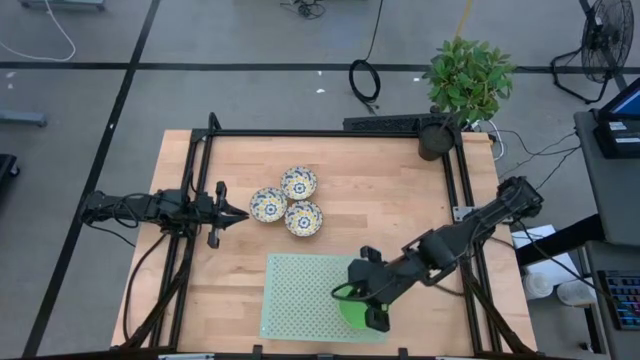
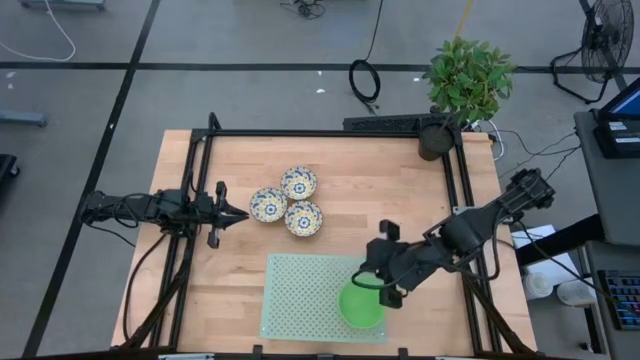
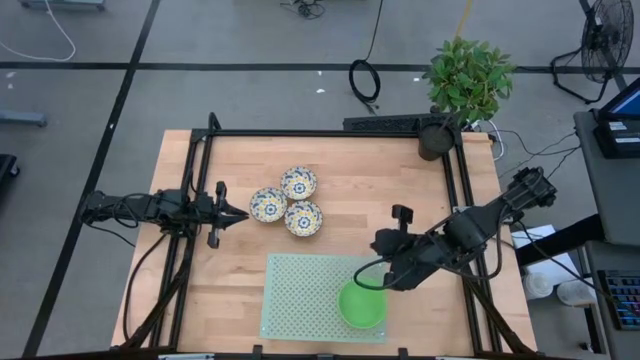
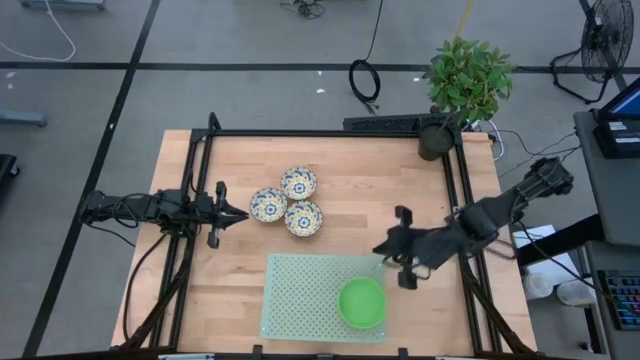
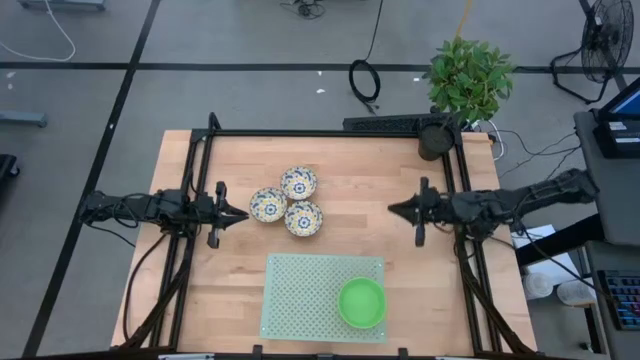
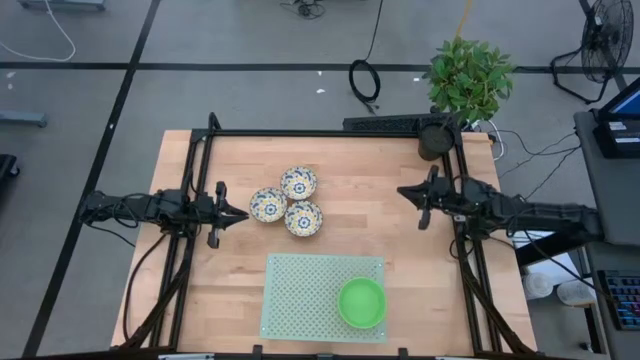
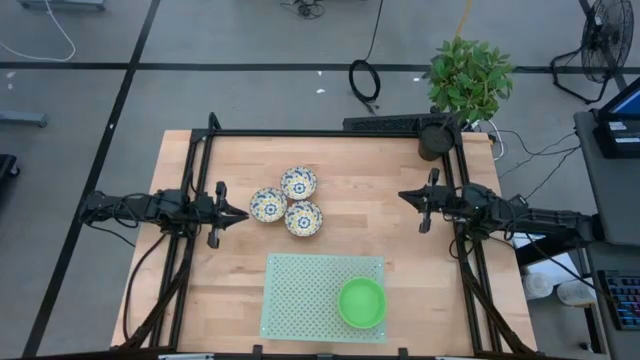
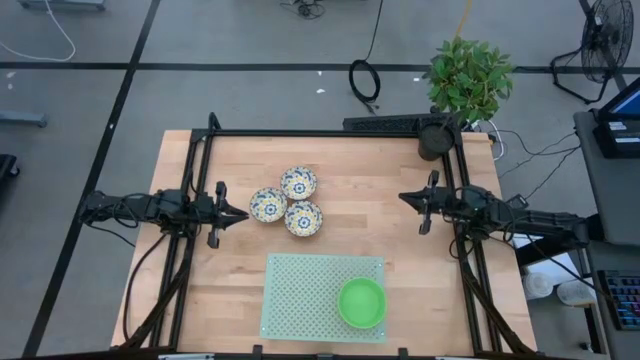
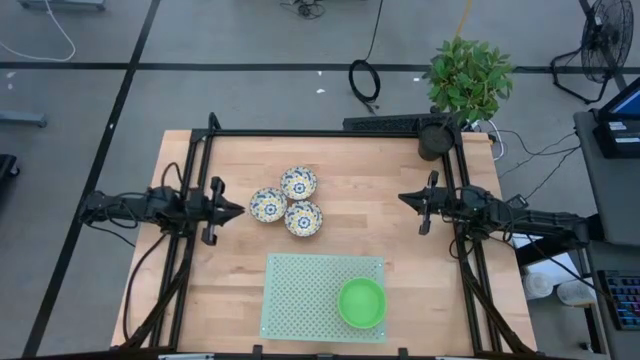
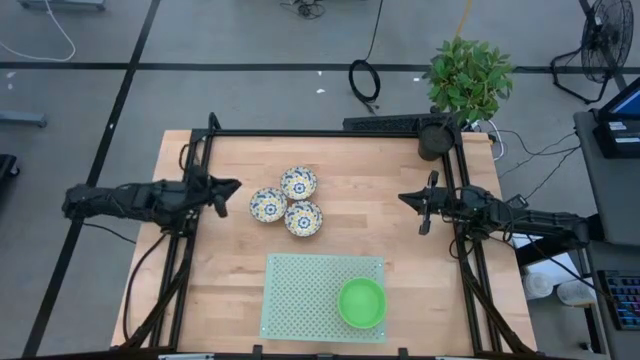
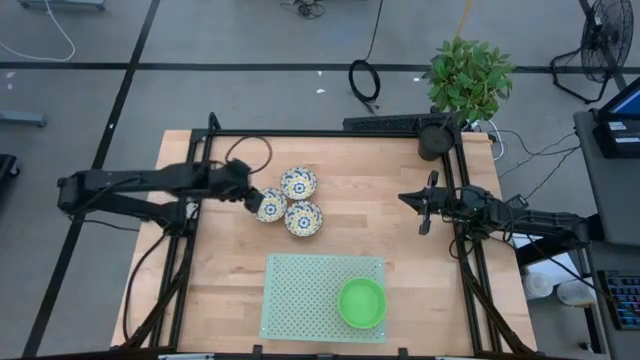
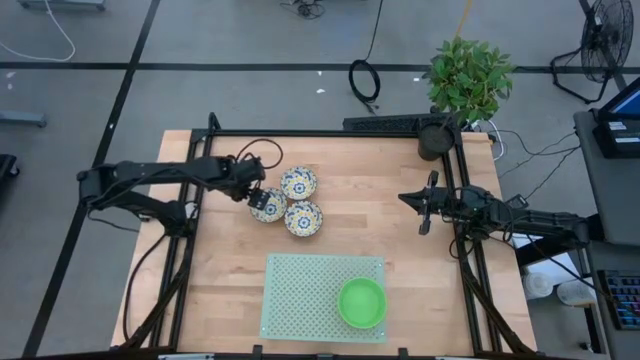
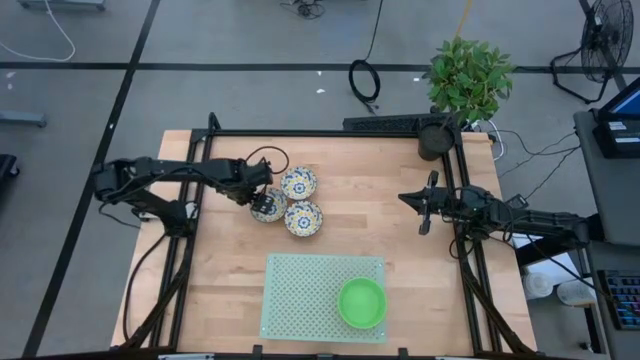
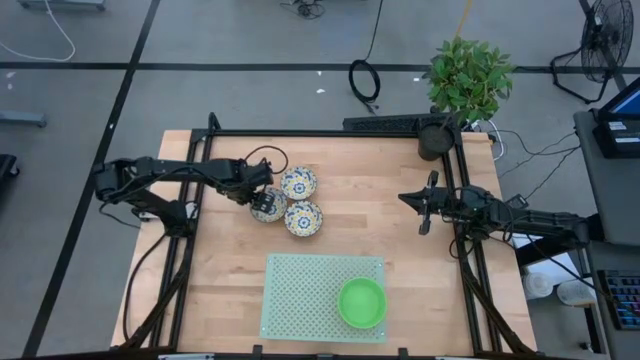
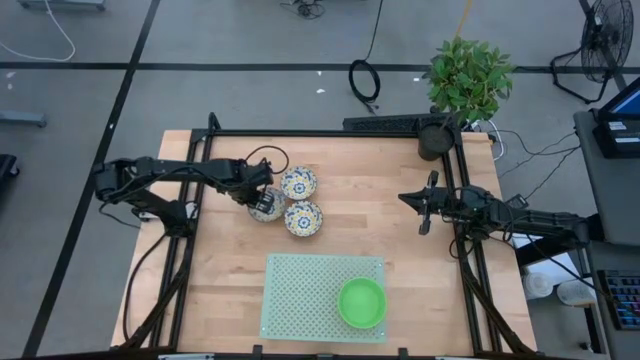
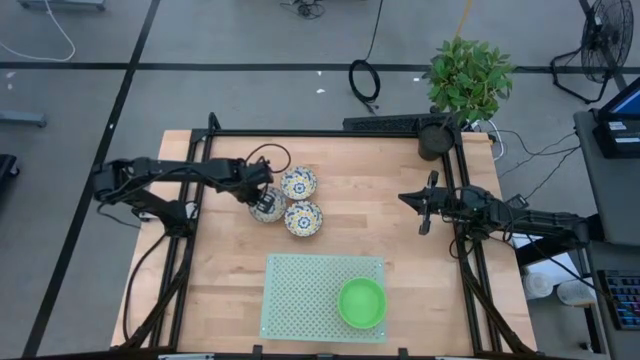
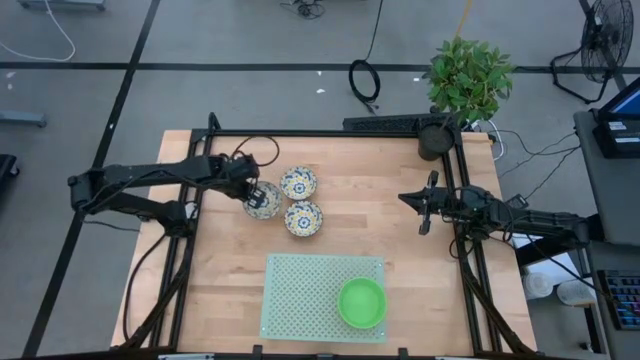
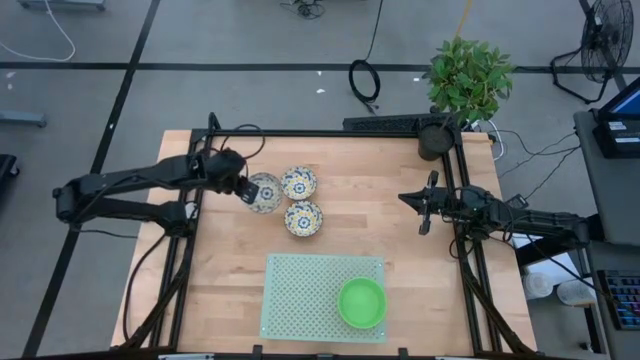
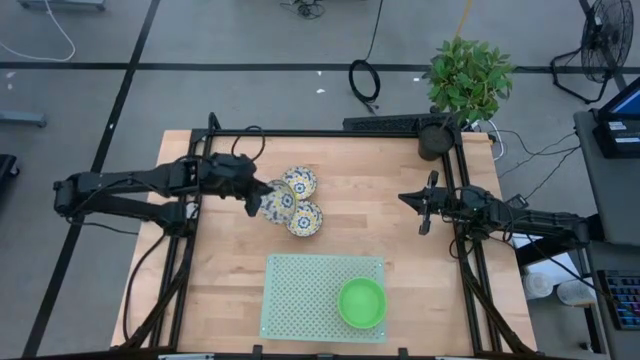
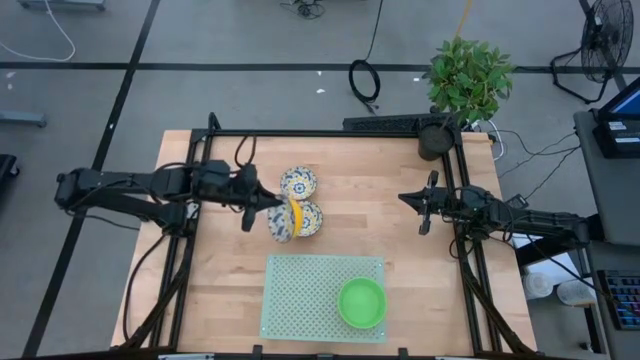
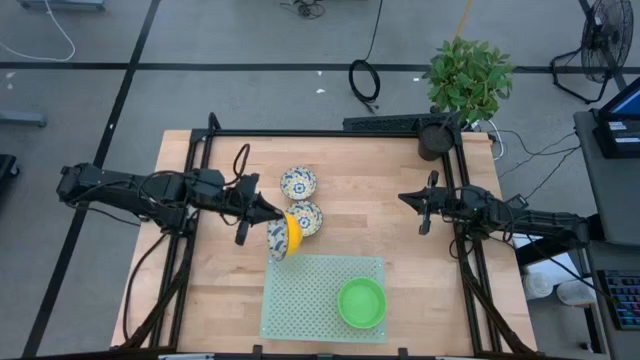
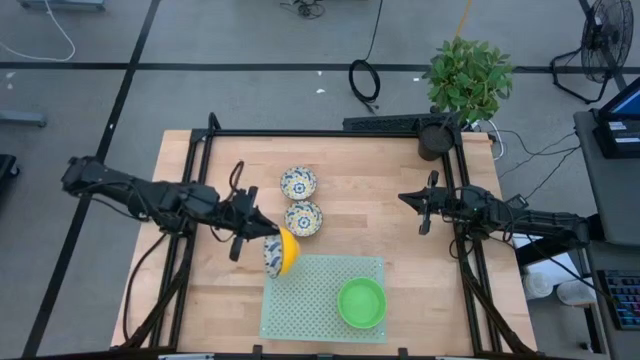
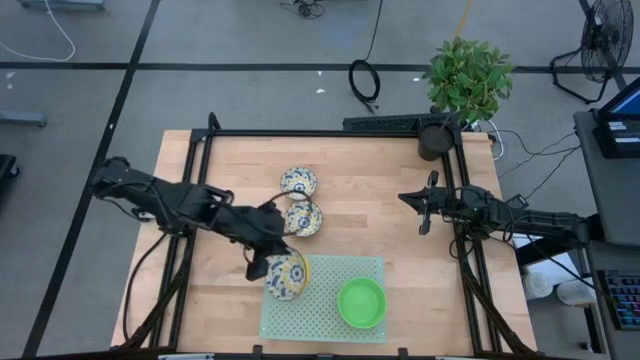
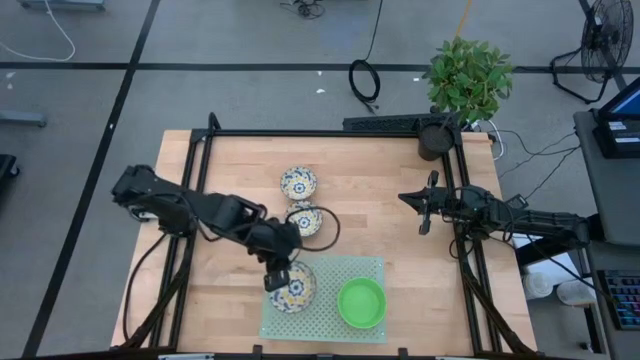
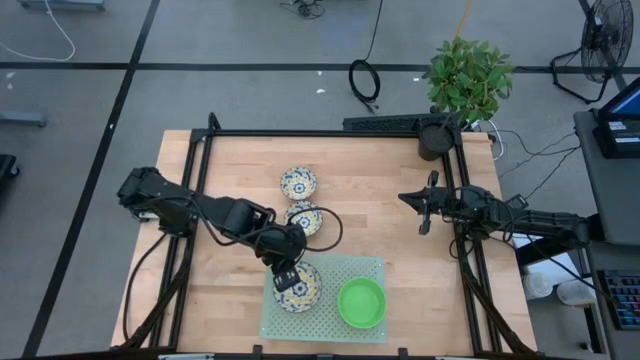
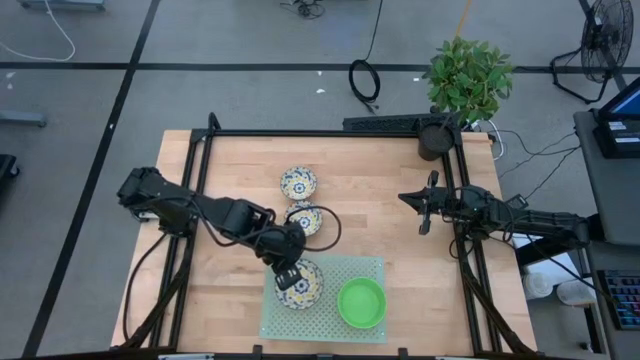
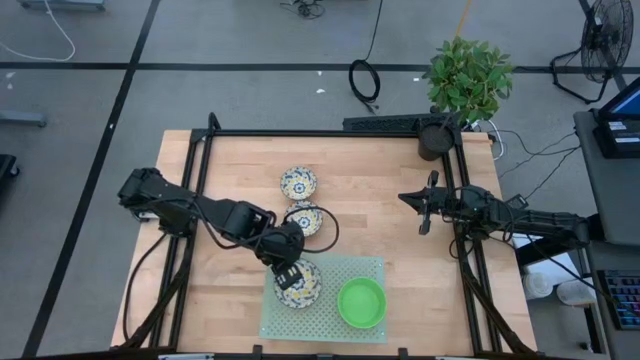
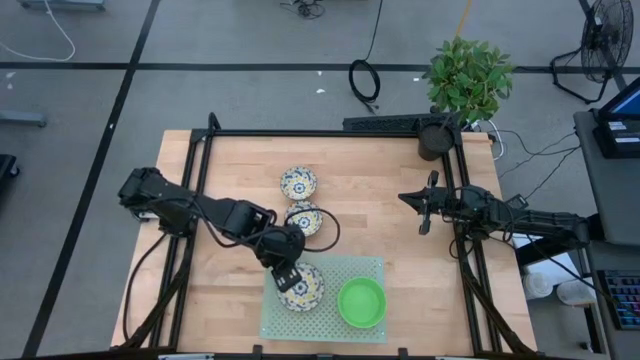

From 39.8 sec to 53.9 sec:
Task: Pick & Place Mini bowls
Put the middle left yellow patterned bowl on the shelf
